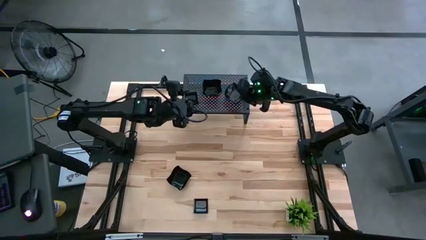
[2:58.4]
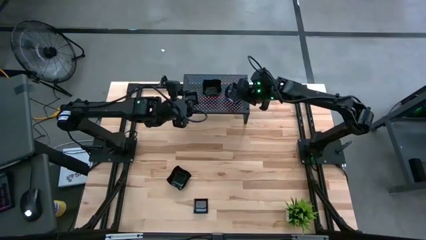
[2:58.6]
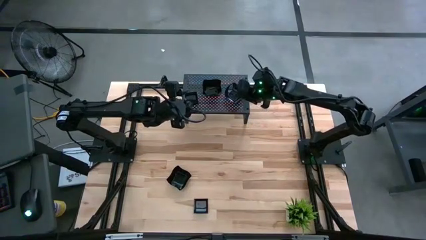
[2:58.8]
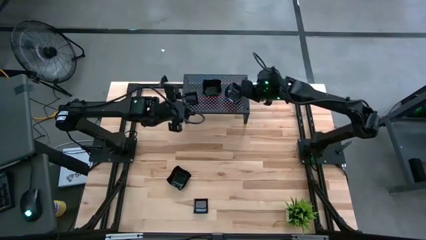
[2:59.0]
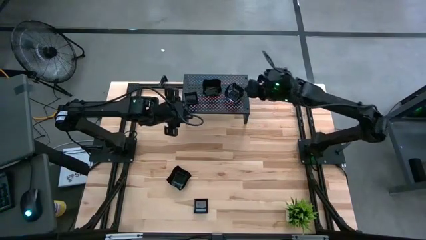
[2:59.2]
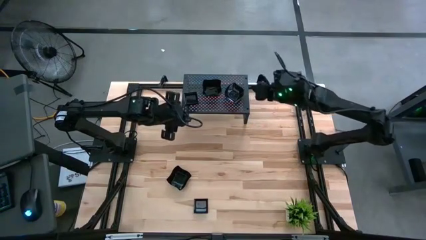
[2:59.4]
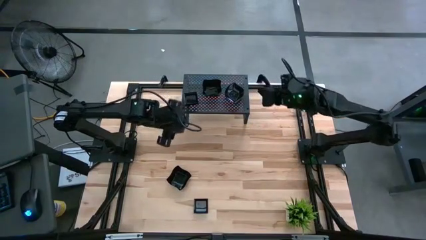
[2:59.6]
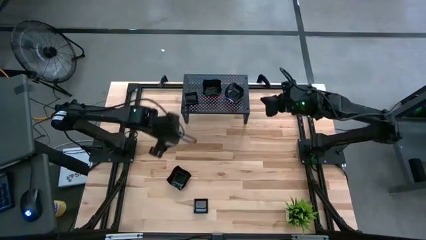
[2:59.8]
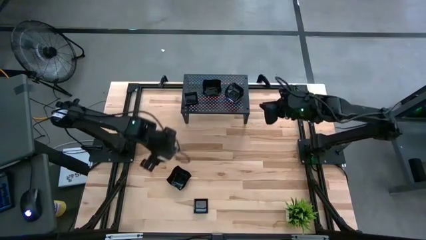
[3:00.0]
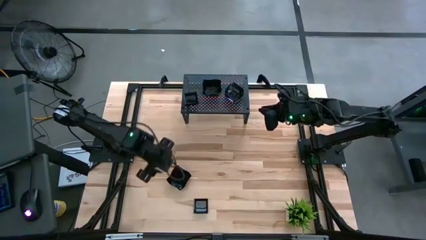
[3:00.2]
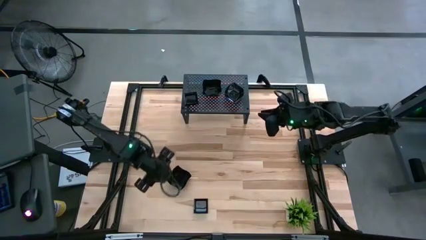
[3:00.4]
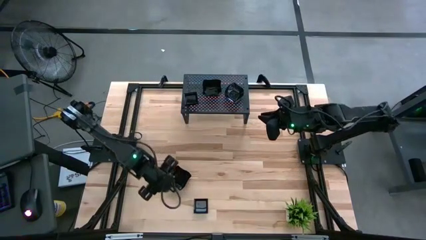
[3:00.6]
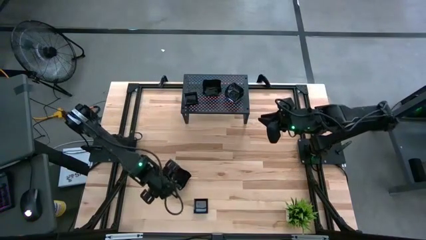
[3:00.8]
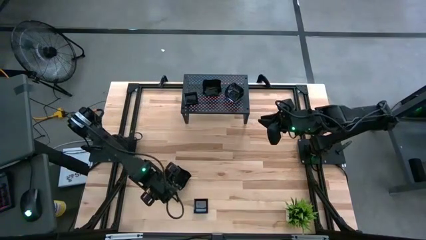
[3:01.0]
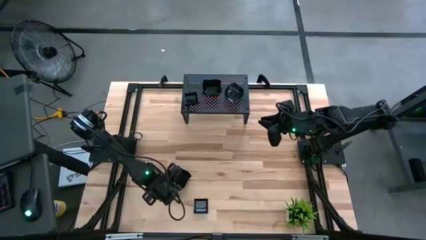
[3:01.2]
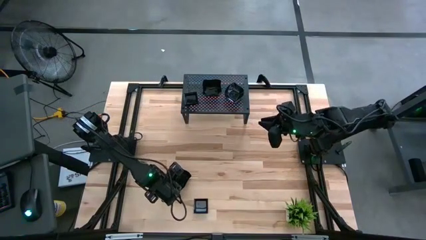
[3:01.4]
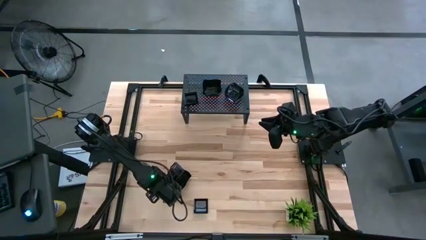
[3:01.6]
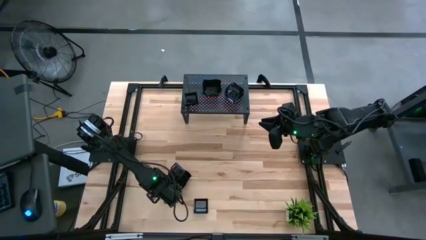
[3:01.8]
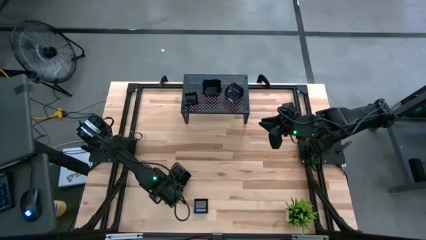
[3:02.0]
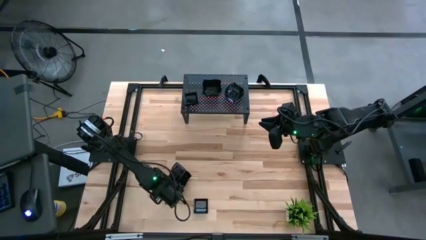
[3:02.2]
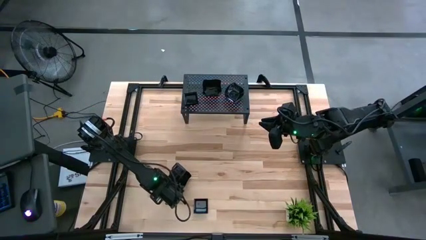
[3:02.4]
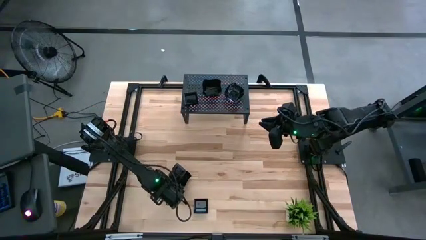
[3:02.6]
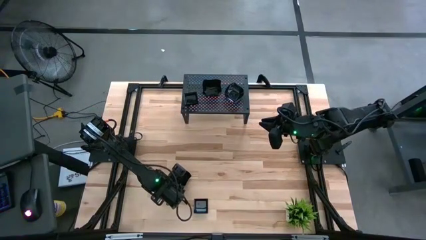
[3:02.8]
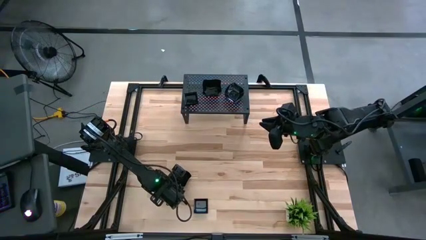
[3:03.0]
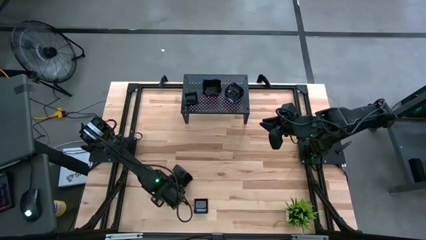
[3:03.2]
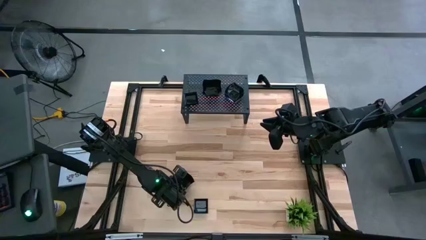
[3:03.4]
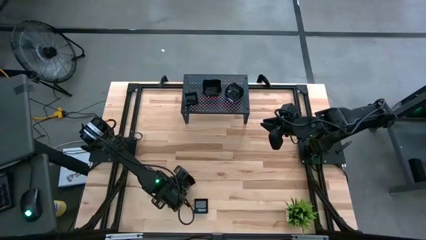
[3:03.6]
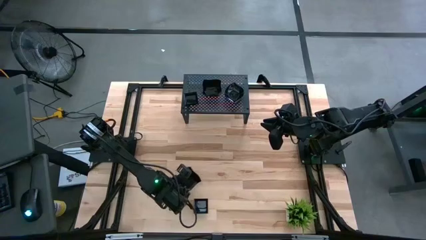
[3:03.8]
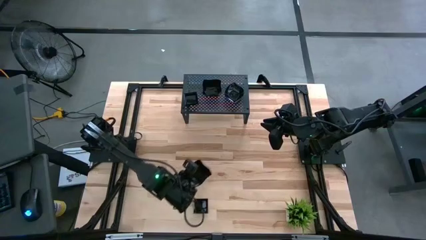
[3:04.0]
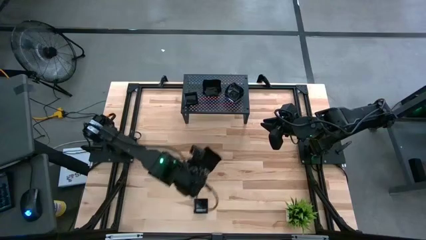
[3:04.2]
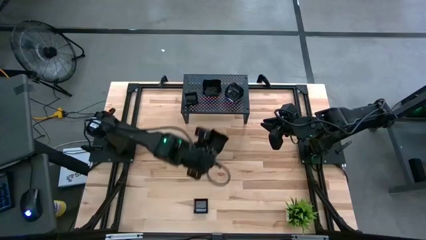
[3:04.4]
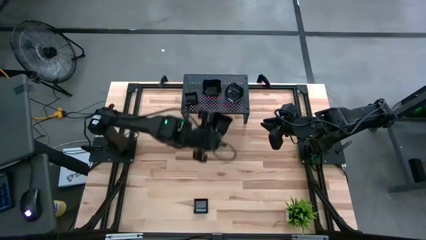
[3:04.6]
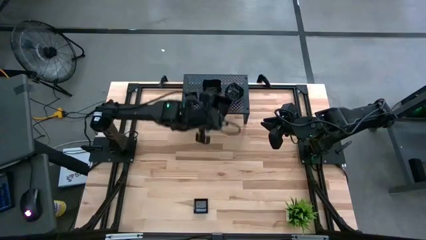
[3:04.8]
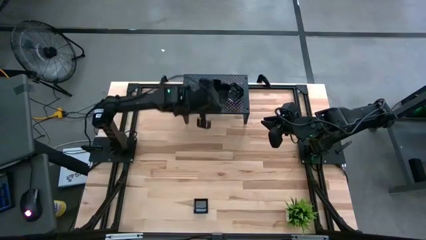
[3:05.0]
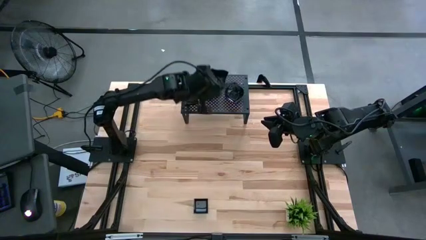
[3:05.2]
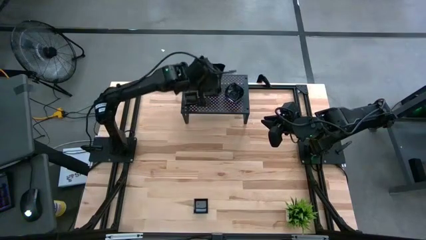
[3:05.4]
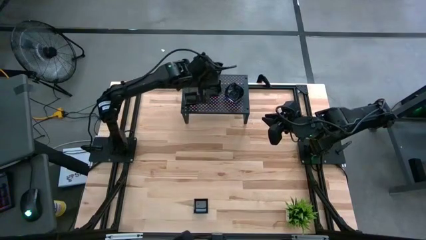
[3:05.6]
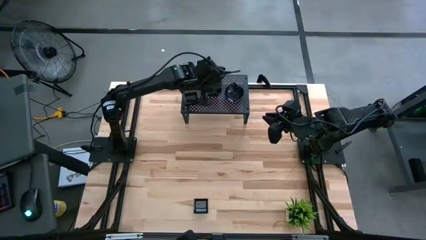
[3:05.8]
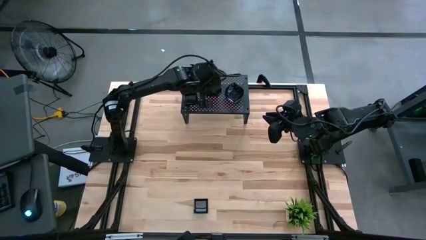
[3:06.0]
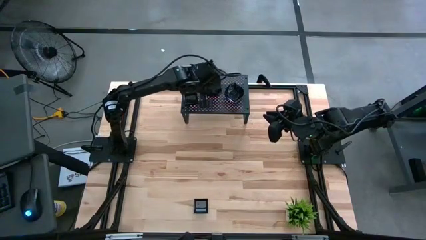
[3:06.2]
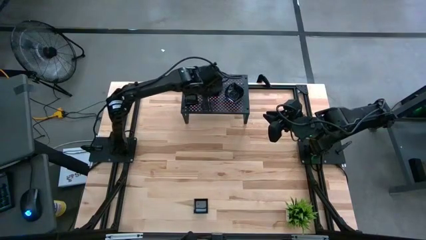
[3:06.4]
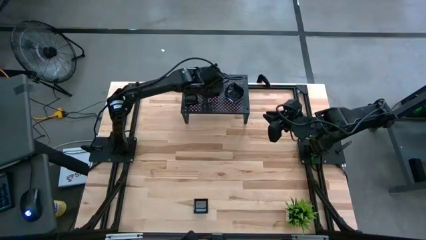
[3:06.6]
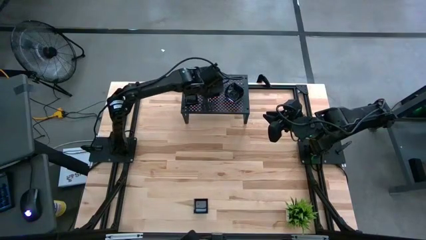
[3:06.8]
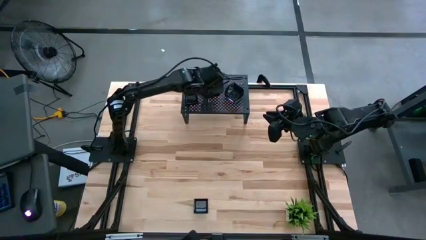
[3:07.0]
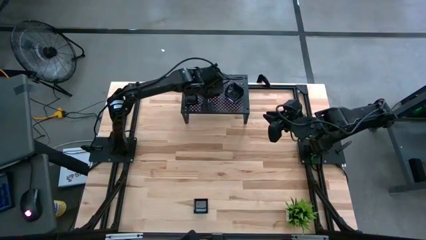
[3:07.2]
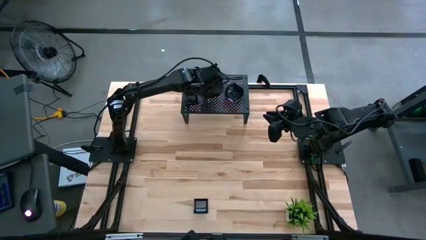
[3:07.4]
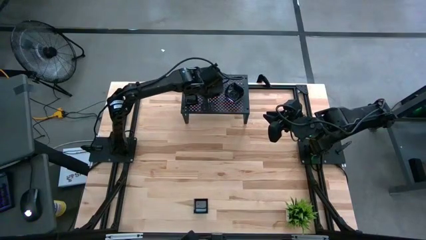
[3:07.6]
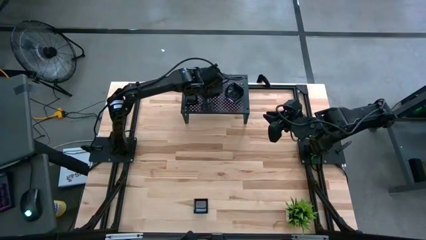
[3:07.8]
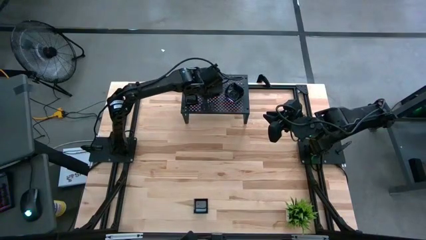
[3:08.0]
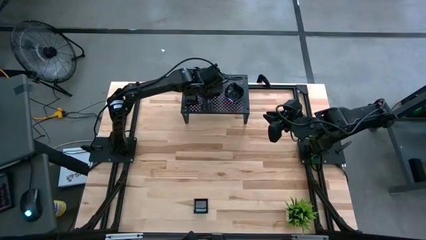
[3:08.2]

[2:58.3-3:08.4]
Task: Pick & Place Mini shaped plates
Stack the distorted square plate on top of the distorted square plate on the shelf

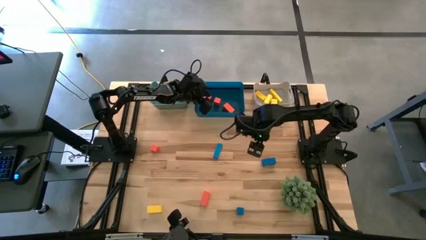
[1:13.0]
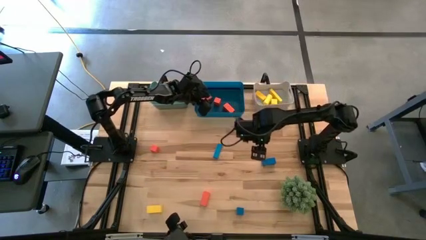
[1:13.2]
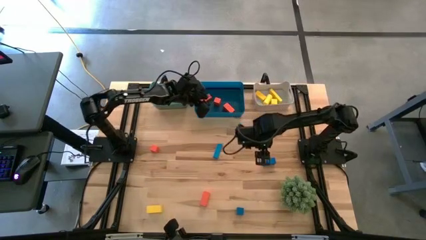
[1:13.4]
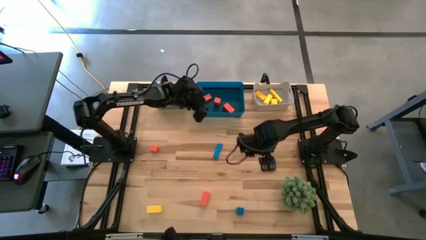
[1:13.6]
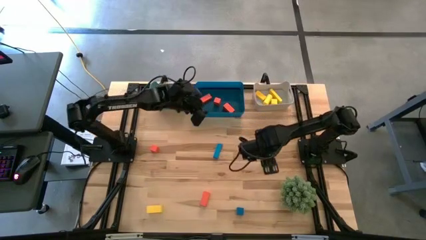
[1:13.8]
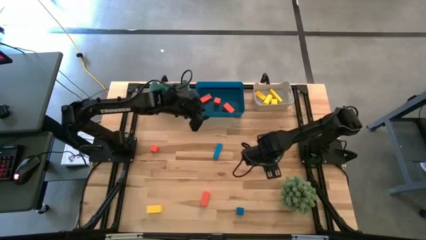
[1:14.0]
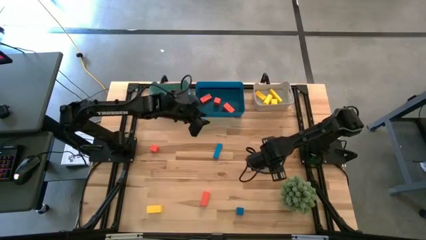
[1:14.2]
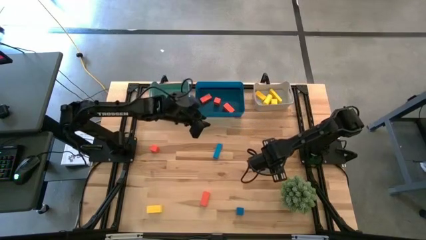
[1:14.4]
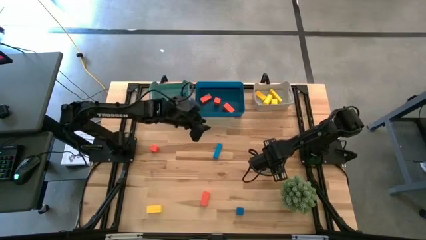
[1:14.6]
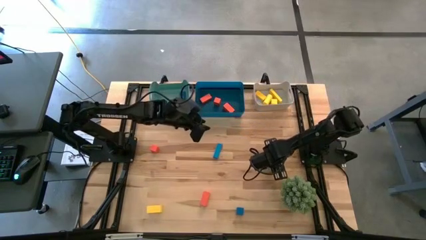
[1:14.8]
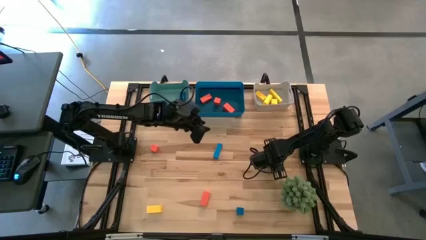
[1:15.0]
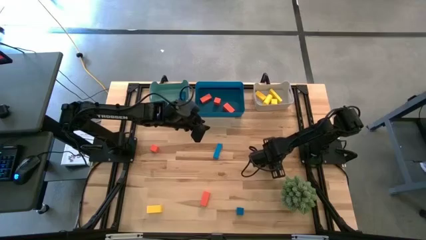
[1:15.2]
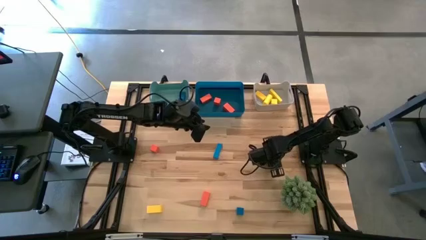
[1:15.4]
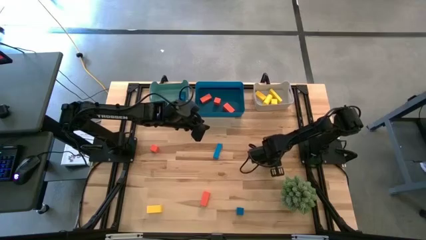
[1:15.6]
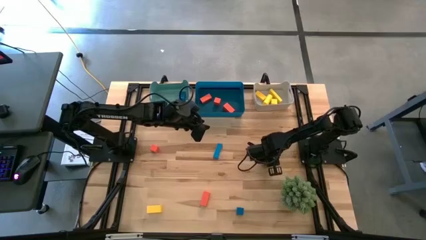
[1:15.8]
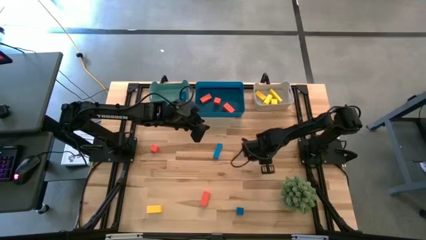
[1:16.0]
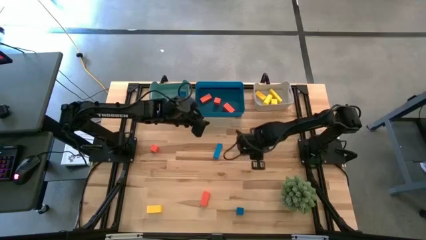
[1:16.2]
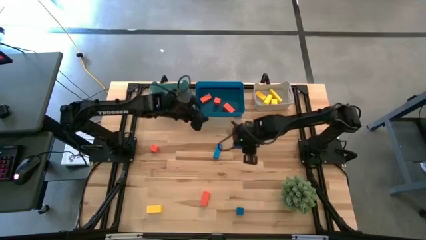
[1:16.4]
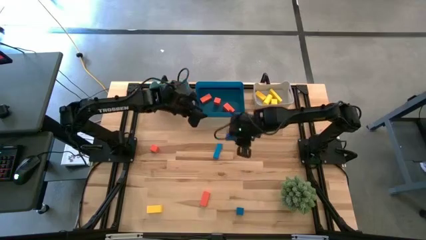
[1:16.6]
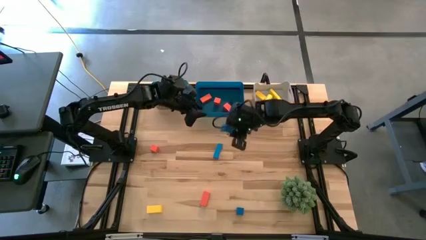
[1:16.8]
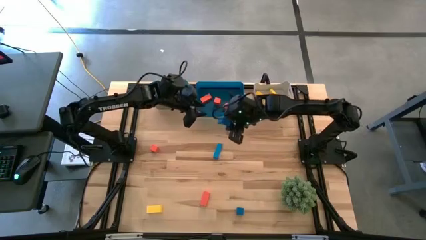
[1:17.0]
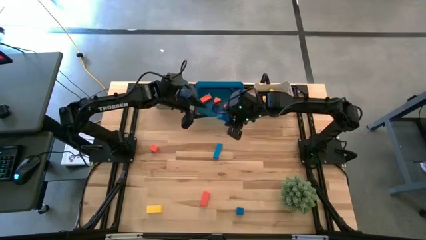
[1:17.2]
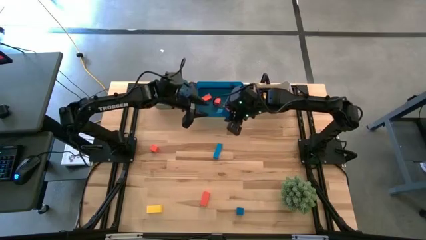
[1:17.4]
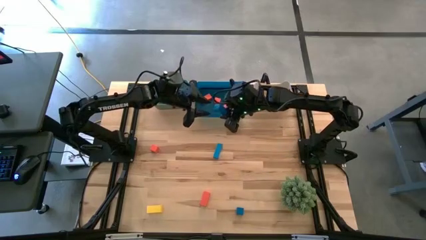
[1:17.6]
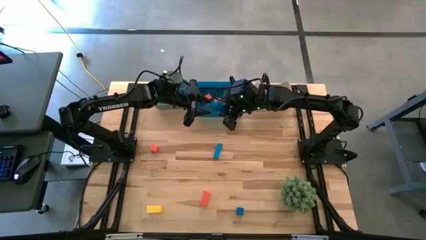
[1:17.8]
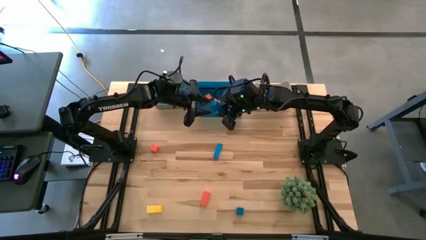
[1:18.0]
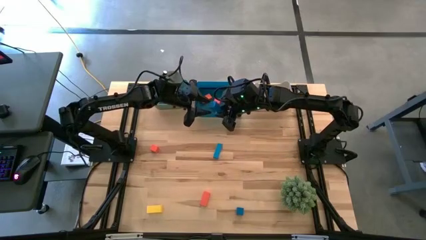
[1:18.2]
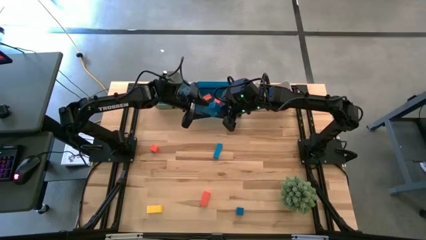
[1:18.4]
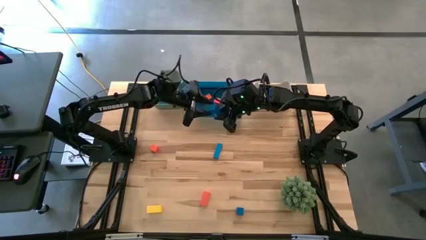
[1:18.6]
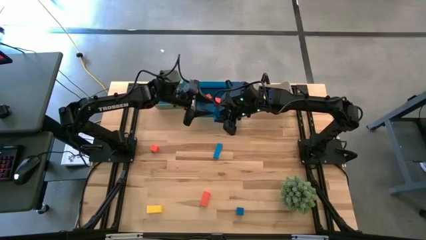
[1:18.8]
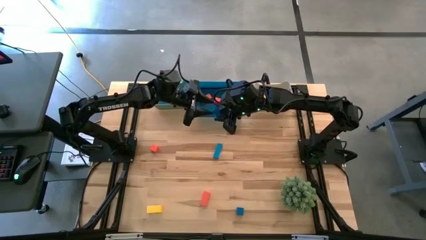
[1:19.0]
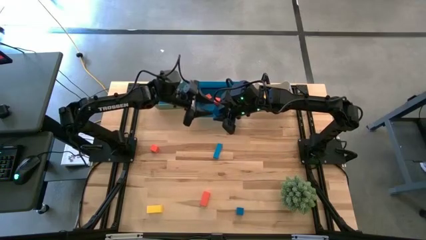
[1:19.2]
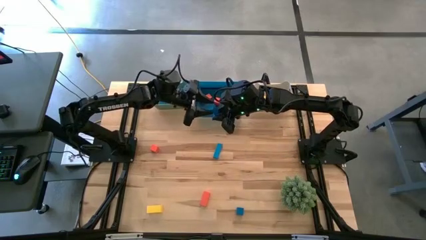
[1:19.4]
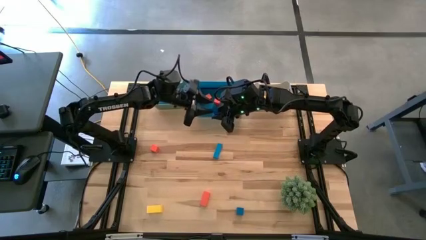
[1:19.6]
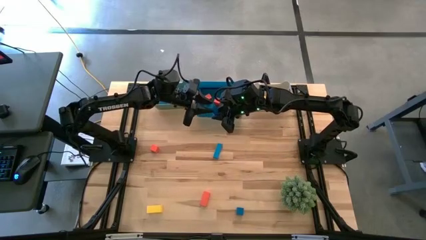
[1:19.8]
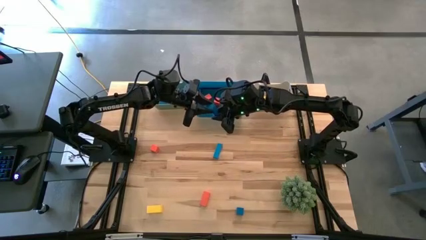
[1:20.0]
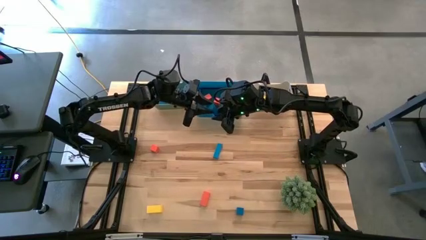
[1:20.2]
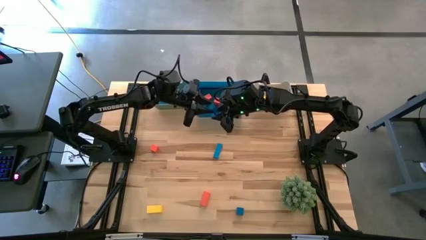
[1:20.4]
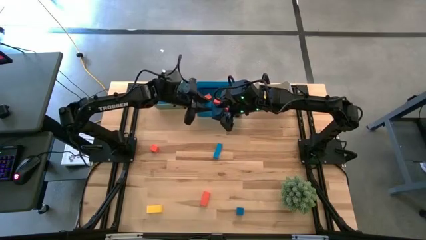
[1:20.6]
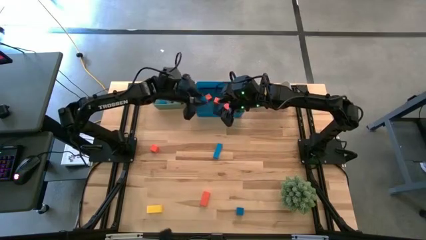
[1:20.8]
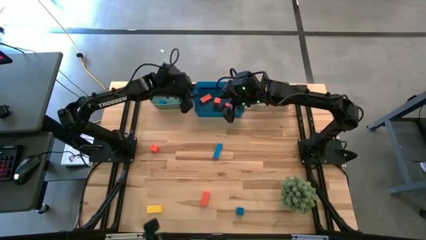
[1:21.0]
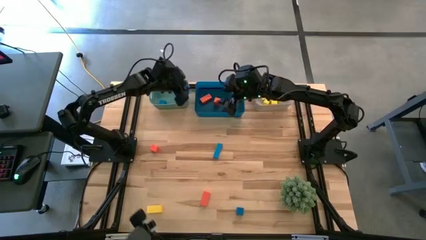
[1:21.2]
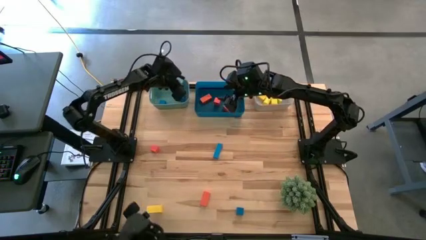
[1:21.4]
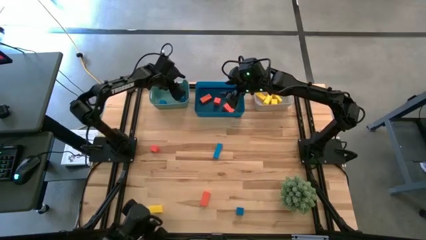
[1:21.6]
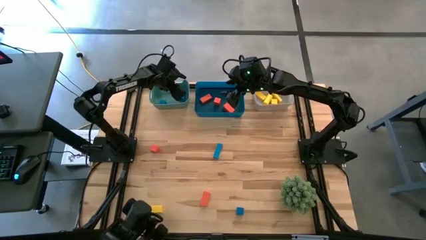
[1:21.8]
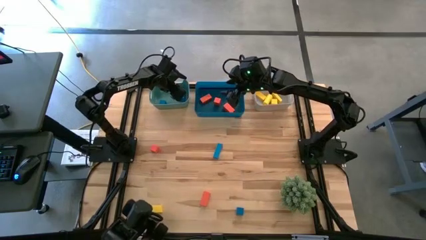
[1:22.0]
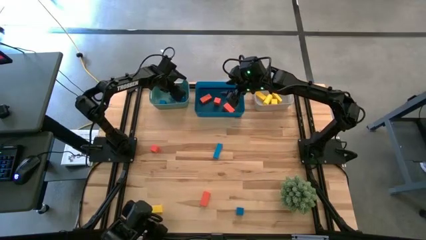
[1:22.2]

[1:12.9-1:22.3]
Task: Sort & place blocks by color
Put the blue block into the green bin
